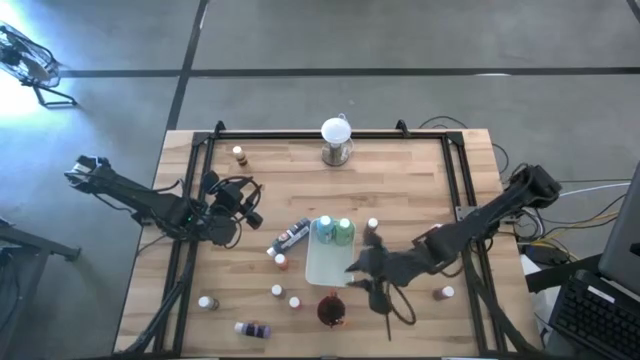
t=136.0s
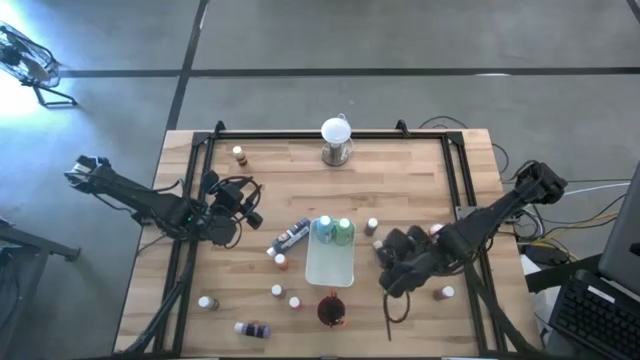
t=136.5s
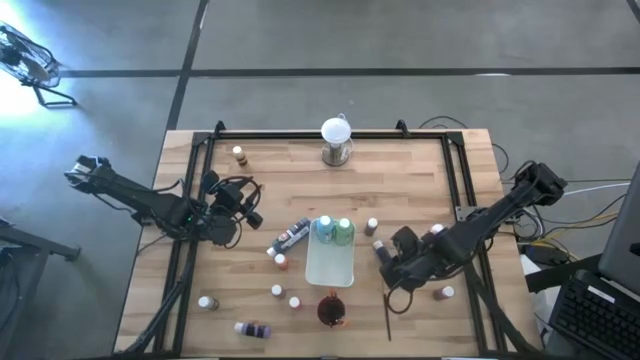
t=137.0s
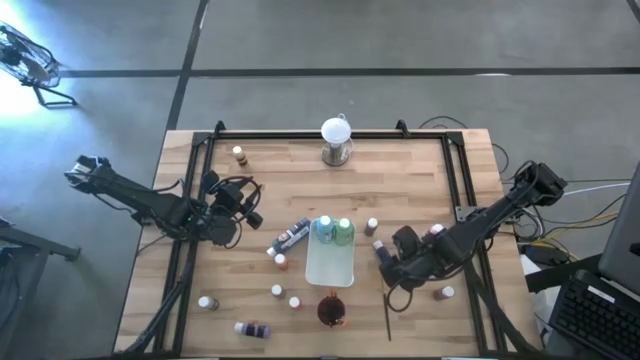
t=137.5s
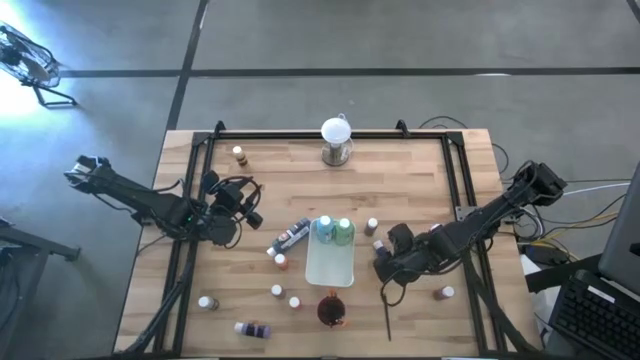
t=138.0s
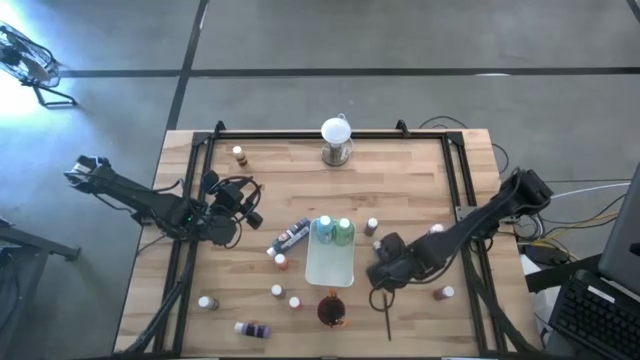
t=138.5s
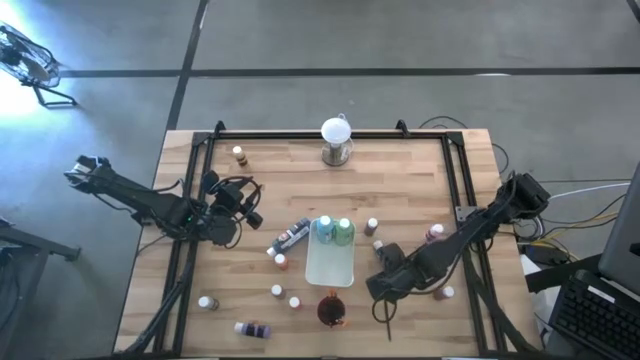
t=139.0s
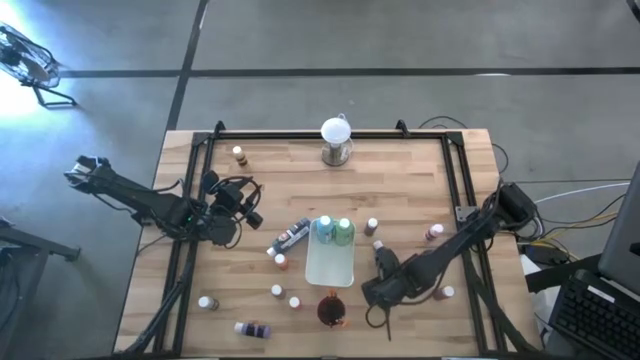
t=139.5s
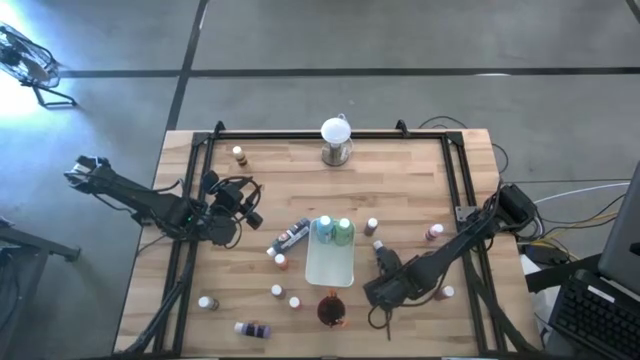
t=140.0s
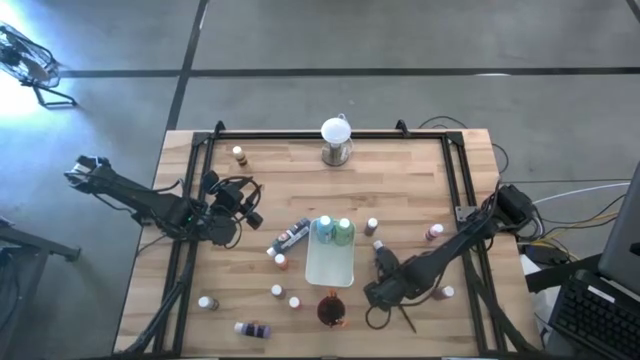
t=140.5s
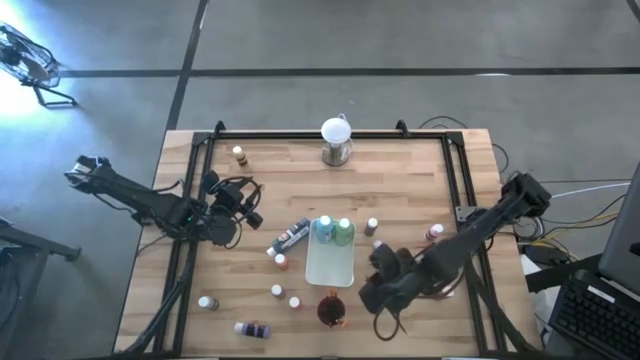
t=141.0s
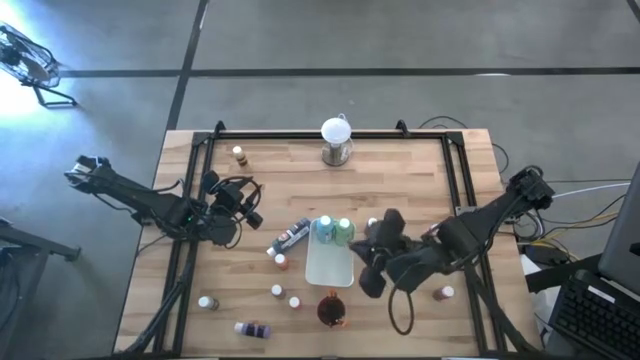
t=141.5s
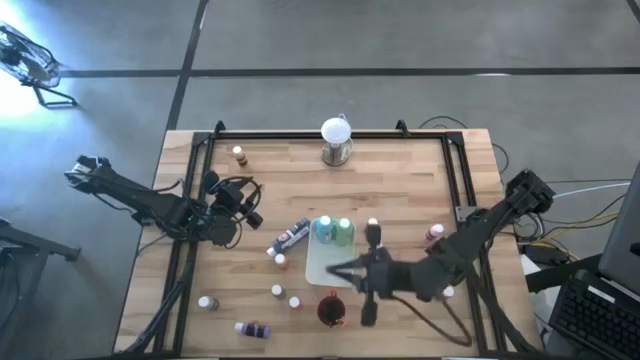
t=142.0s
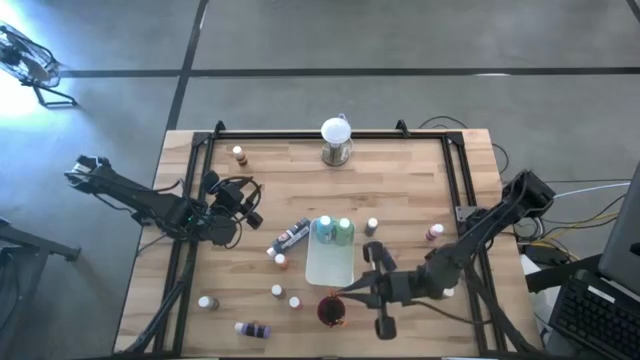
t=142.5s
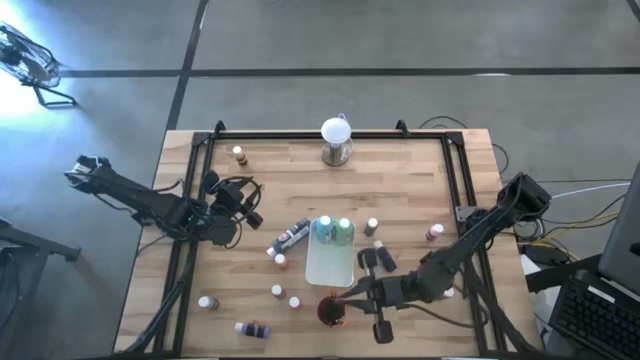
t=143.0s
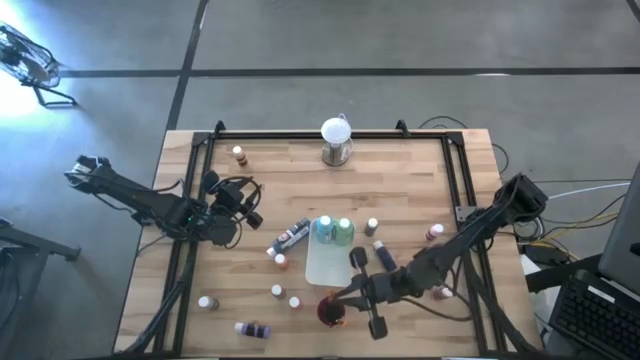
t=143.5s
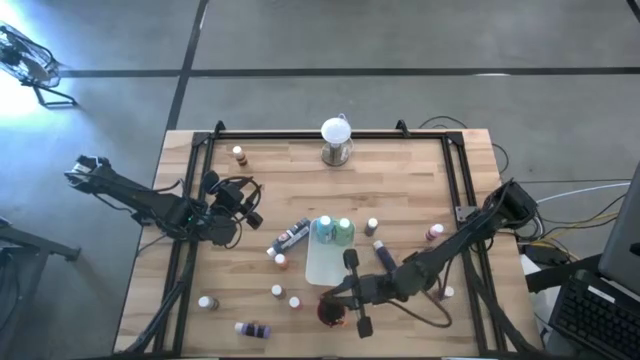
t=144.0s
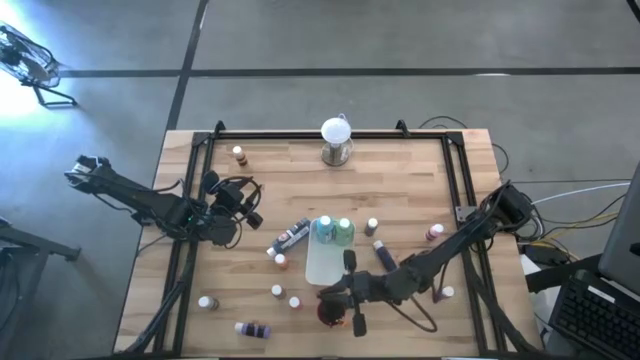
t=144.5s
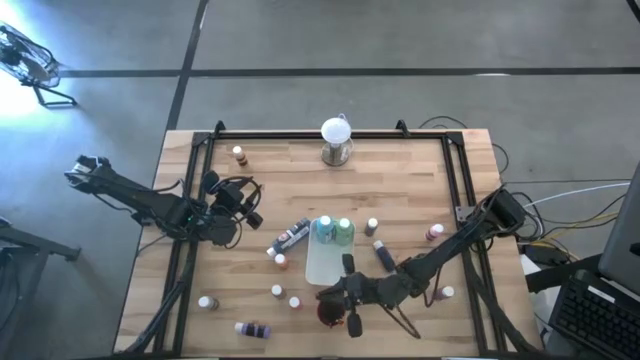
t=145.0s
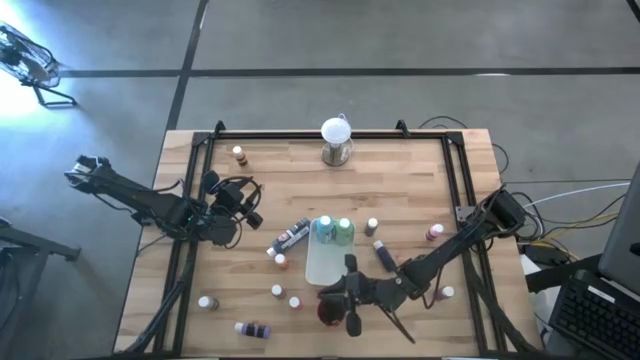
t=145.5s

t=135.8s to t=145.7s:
Task: Pick & Place Paint Supplies
Put the gold paint brush into the red cup

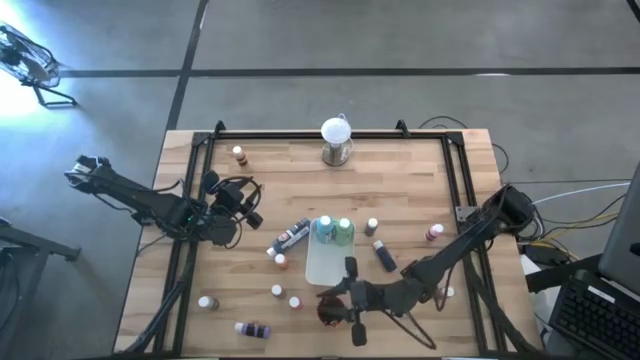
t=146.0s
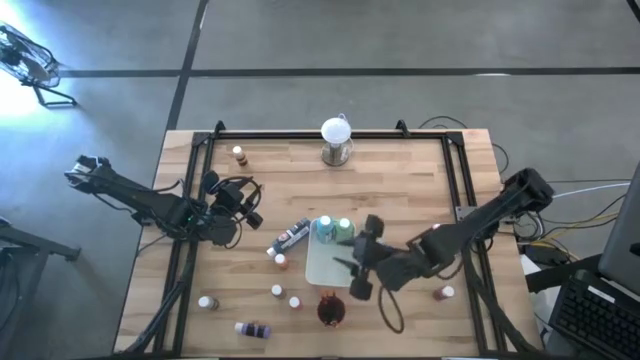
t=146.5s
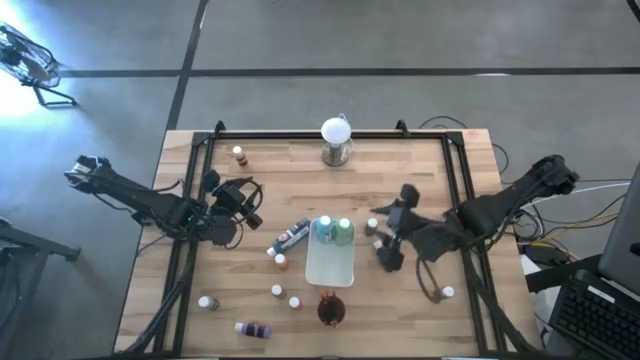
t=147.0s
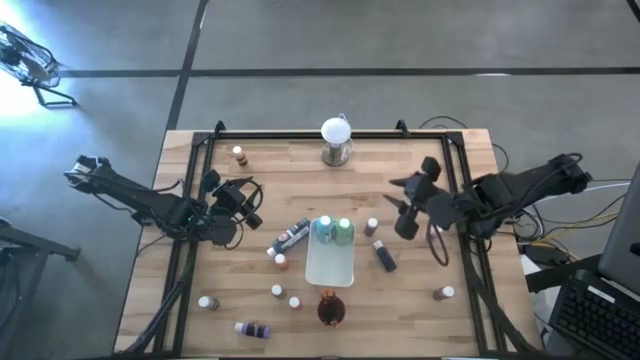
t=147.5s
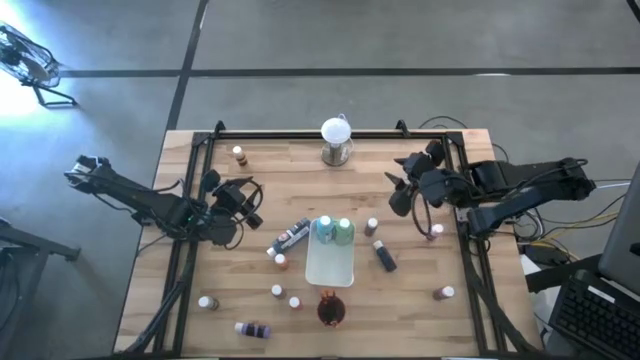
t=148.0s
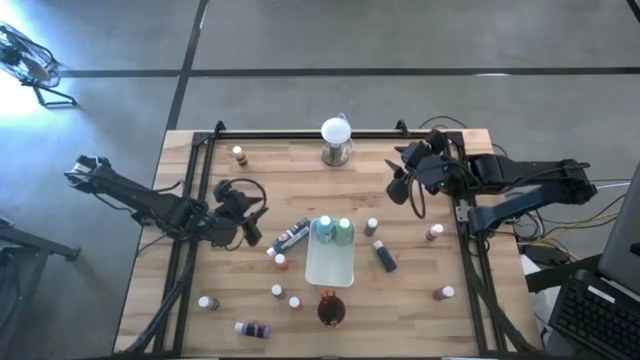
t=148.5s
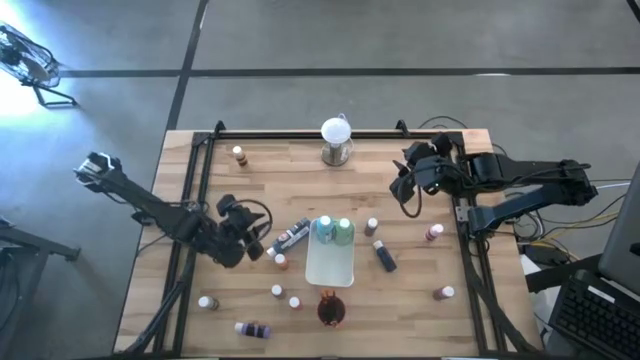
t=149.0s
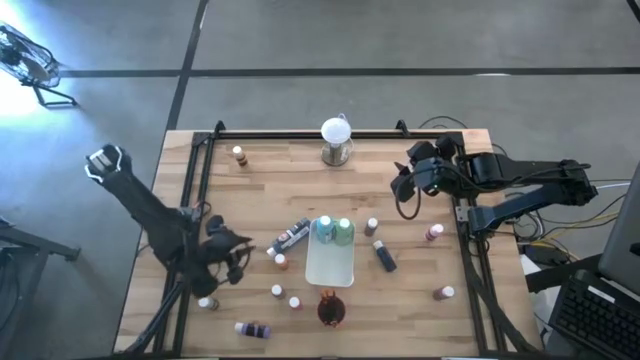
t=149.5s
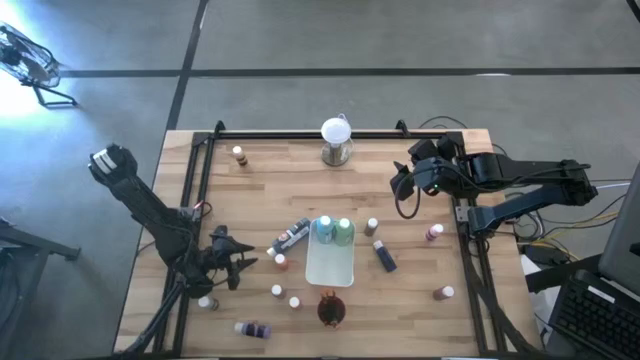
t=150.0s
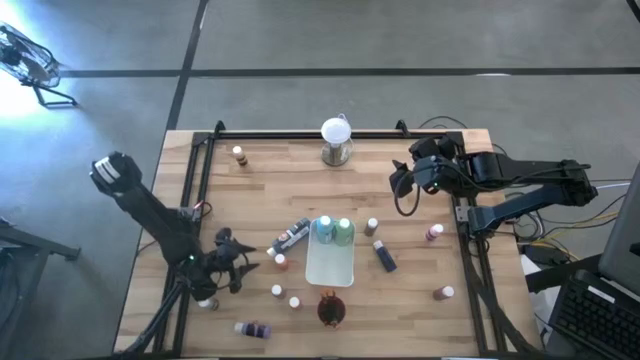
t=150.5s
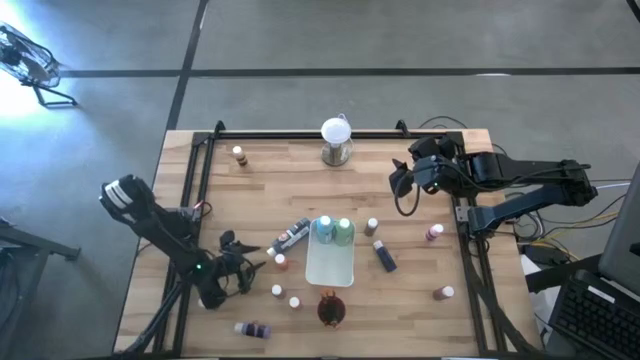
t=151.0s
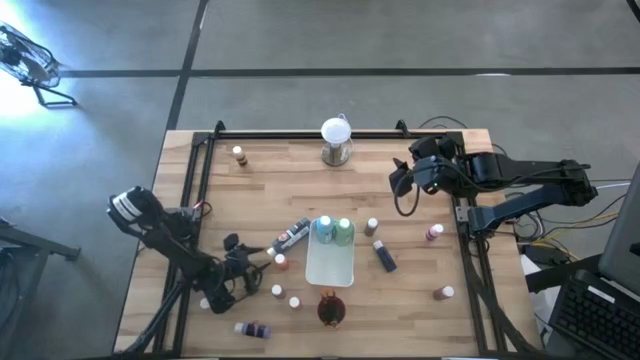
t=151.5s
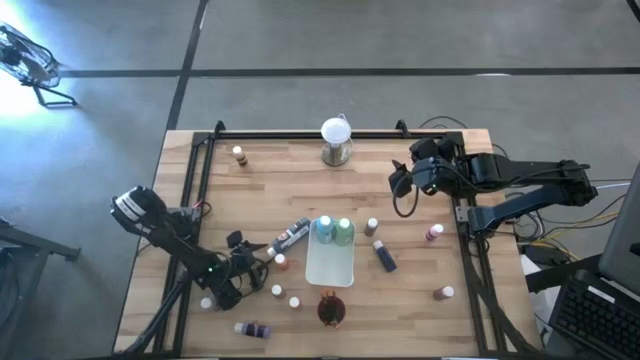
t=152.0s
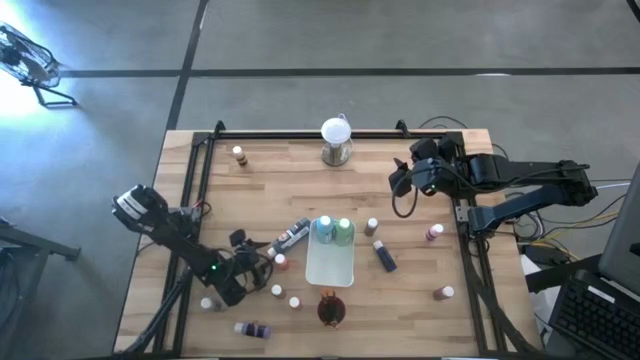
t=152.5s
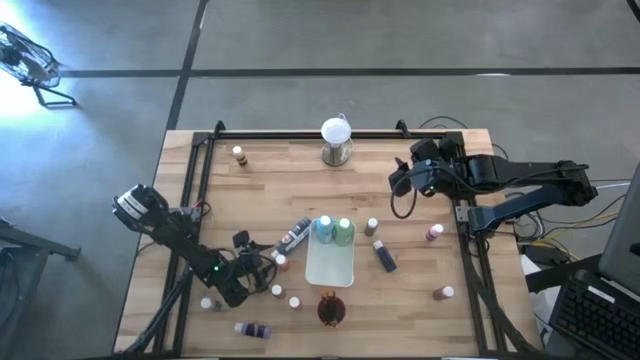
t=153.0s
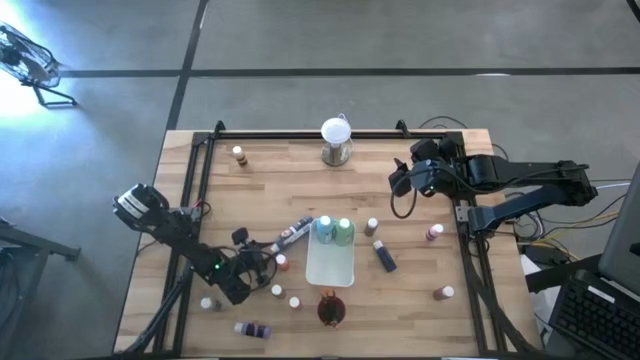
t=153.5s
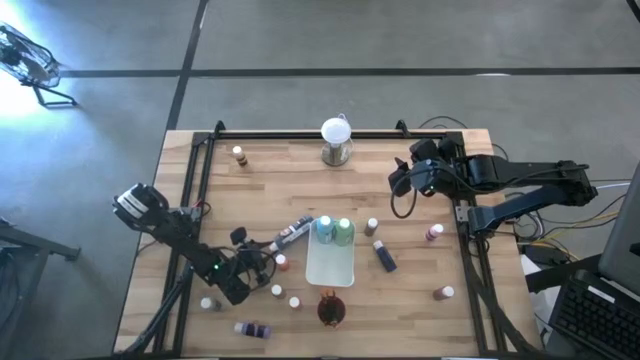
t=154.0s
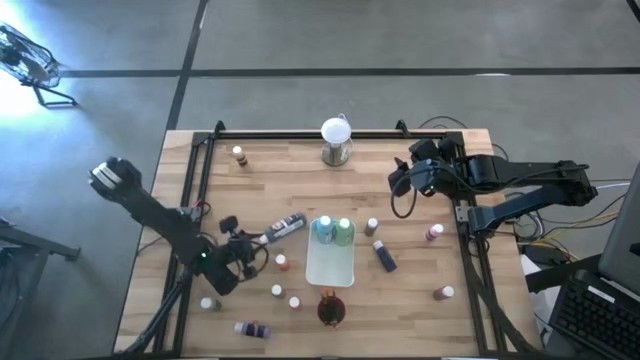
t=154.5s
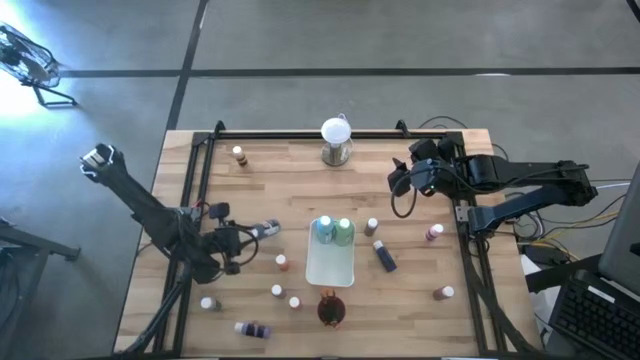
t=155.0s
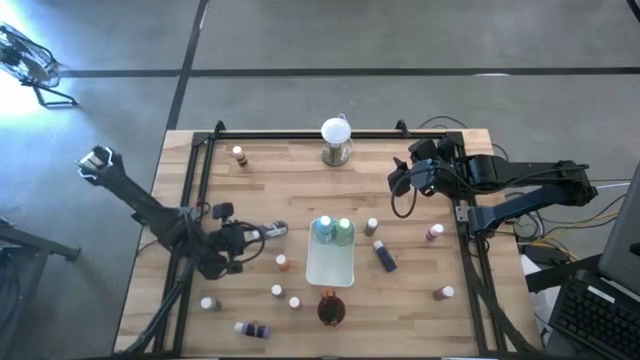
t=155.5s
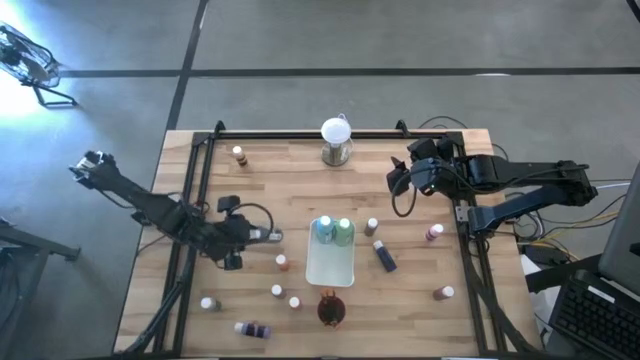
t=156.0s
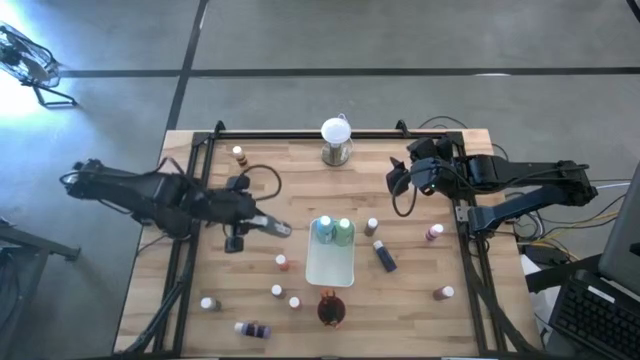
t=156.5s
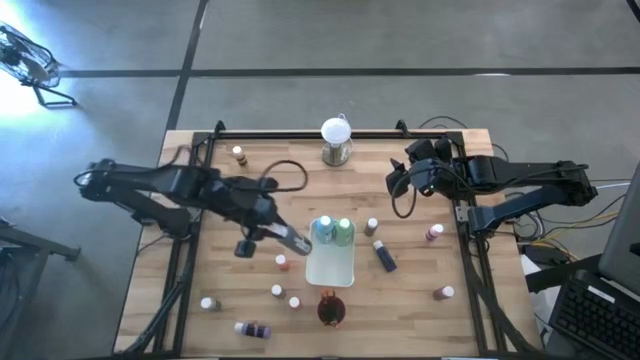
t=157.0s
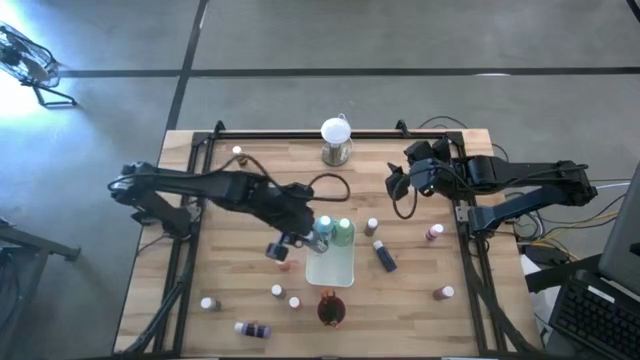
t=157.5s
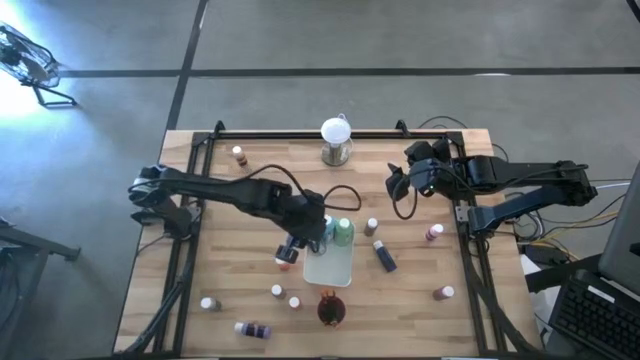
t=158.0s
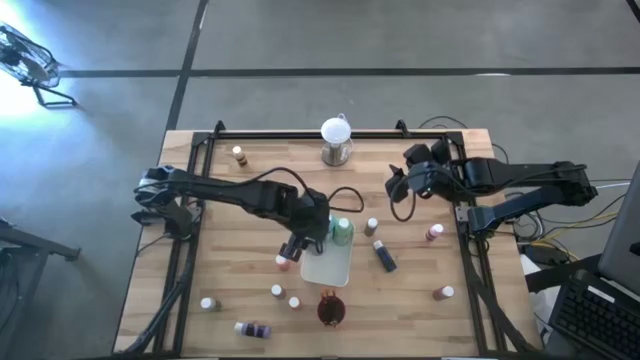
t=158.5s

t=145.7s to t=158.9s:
Put the black paint bottle into the white bin
